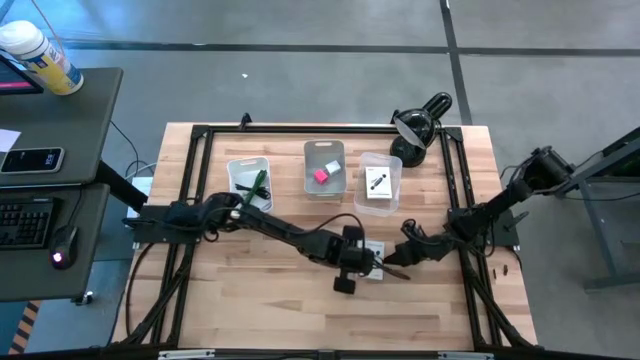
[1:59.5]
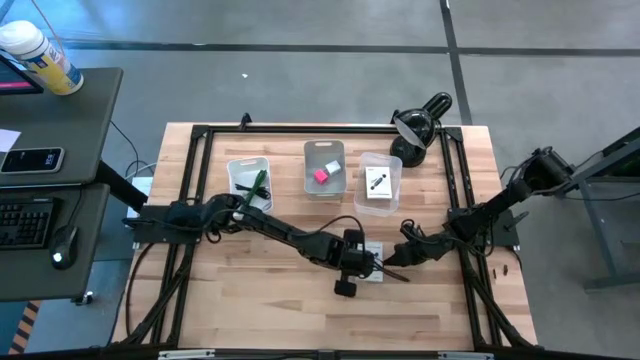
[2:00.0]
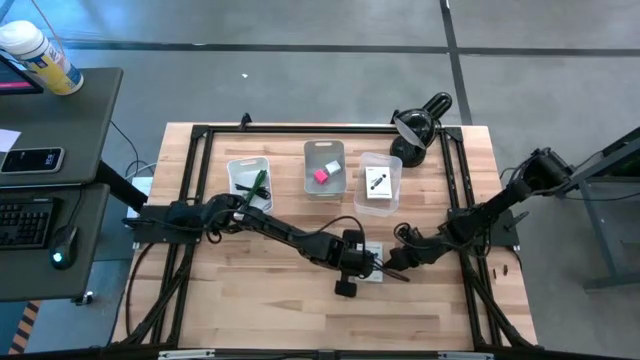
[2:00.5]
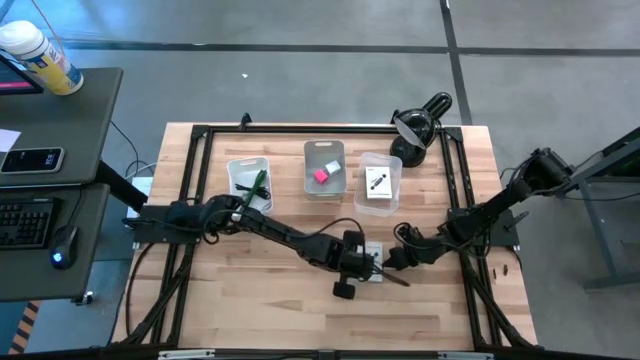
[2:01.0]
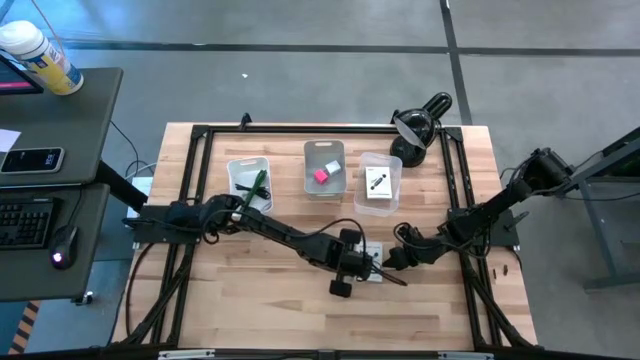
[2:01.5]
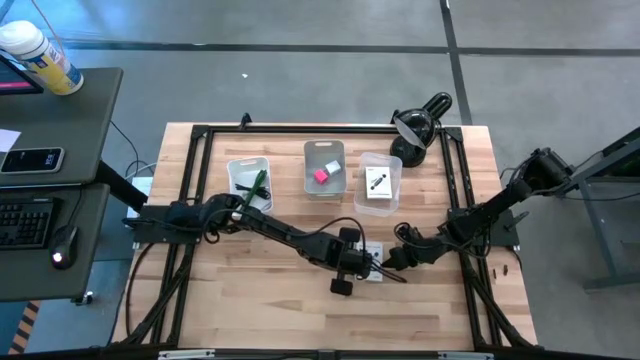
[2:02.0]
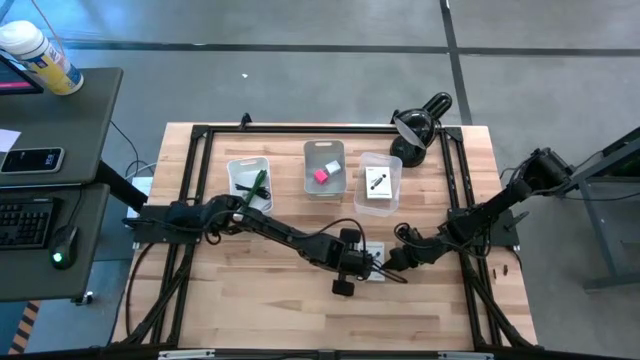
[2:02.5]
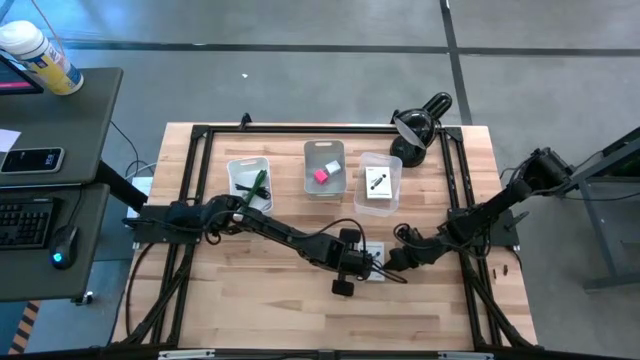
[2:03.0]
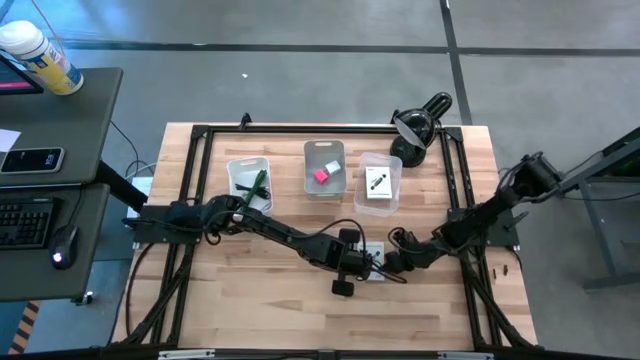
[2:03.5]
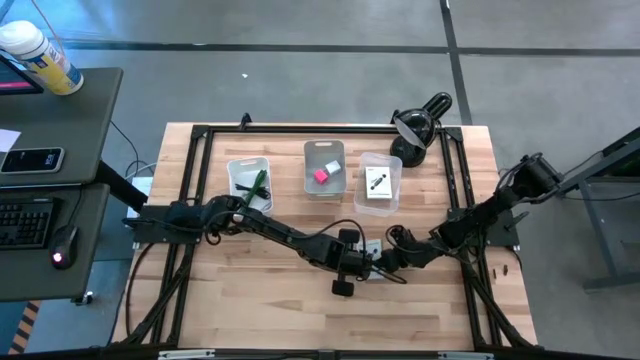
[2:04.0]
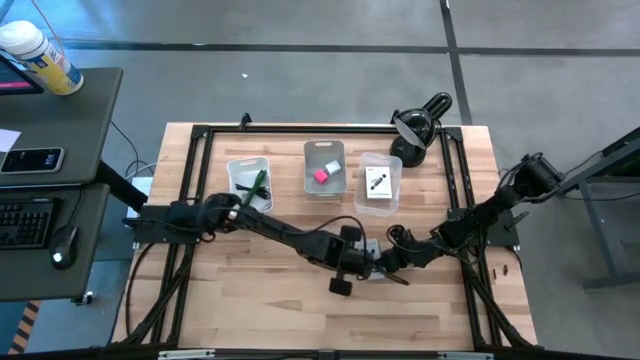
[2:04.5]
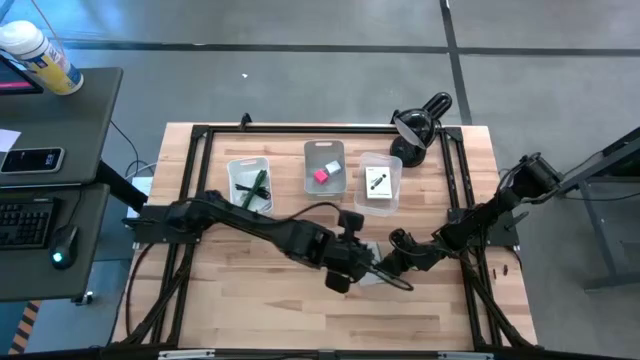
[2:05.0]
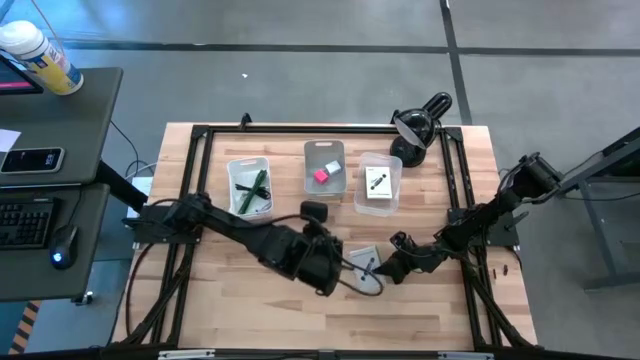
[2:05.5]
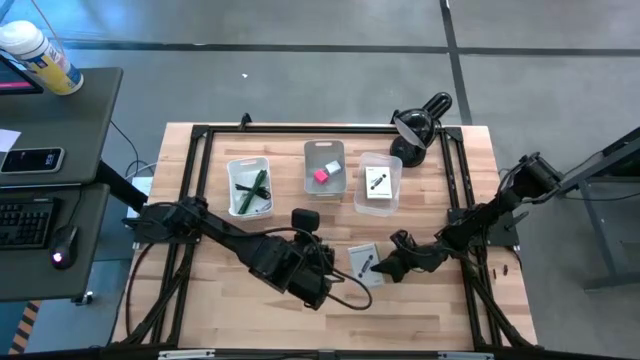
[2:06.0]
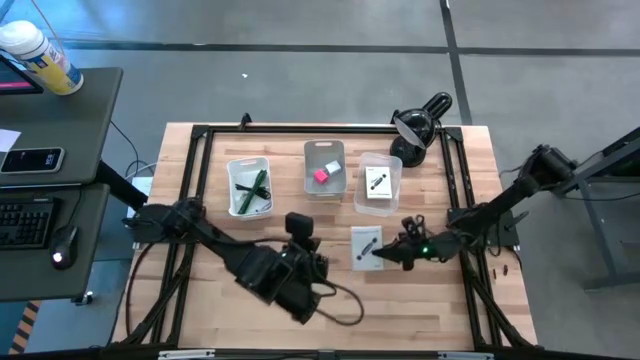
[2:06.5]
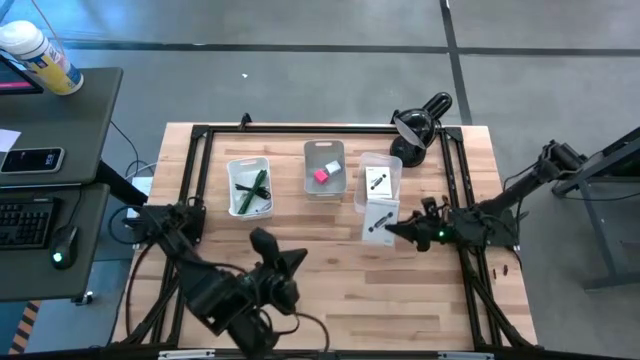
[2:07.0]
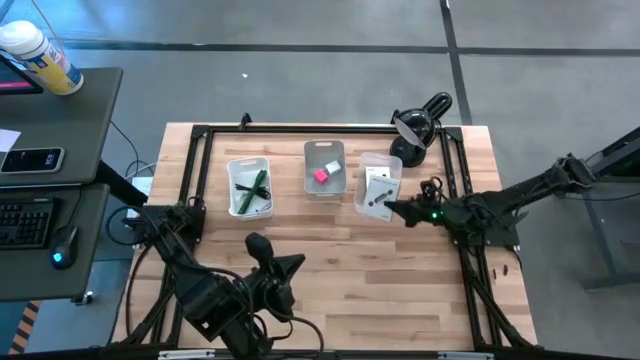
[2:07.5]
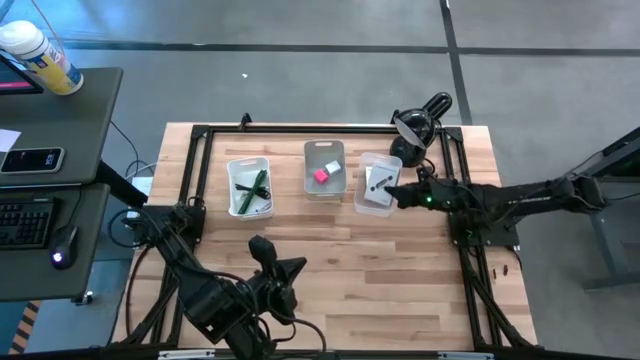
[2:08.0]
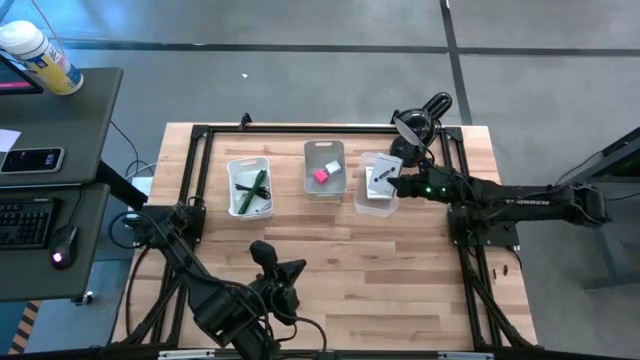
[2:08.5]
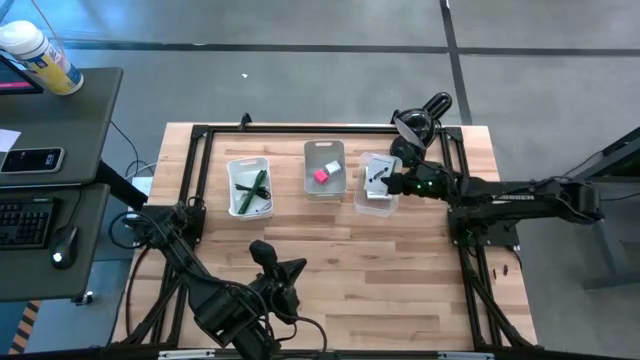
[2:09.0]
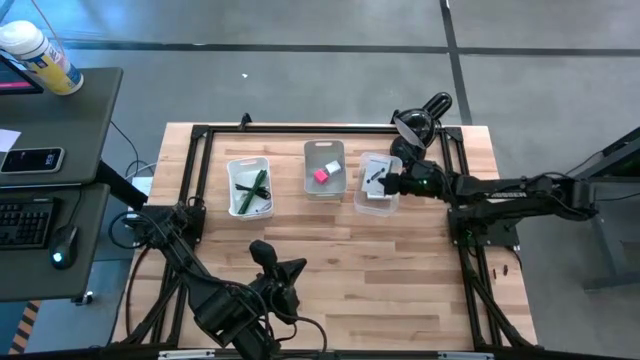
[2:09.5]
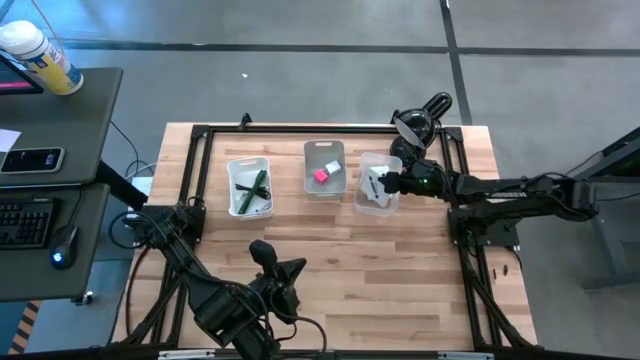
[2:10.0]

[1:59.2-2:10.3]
Task: Pick and place items into bin
Put the card reader box into the transparent bin

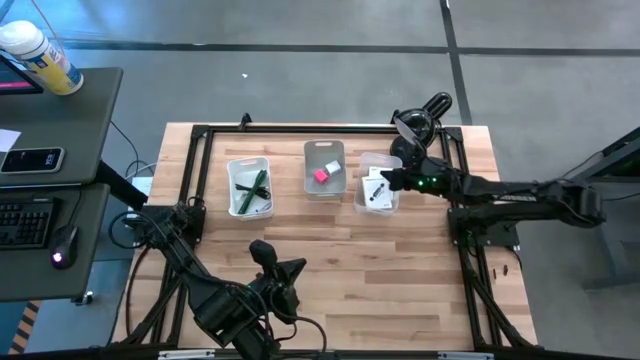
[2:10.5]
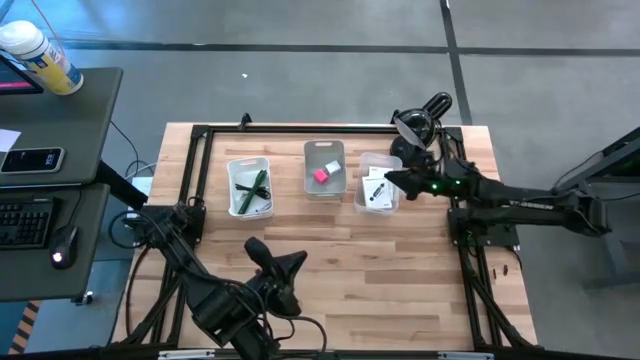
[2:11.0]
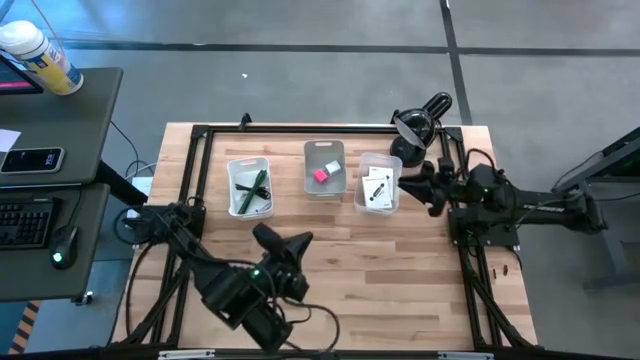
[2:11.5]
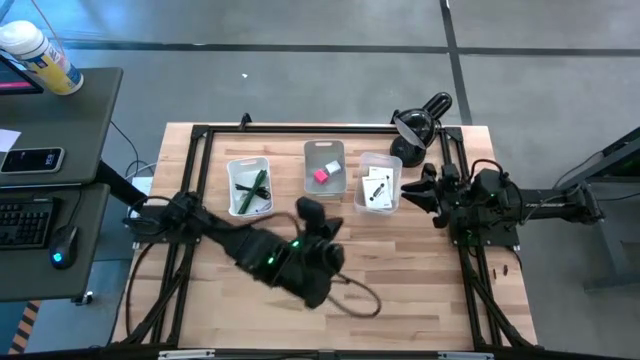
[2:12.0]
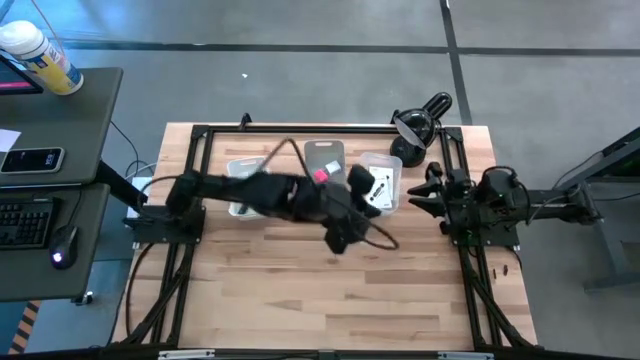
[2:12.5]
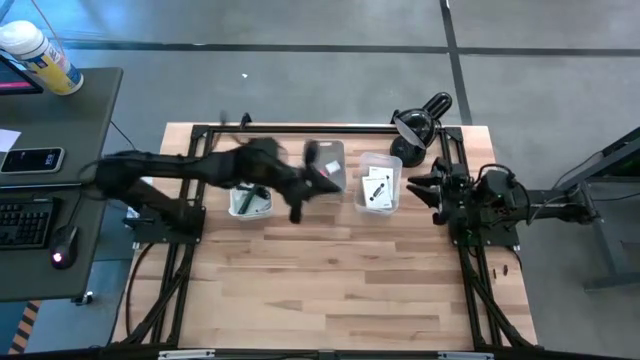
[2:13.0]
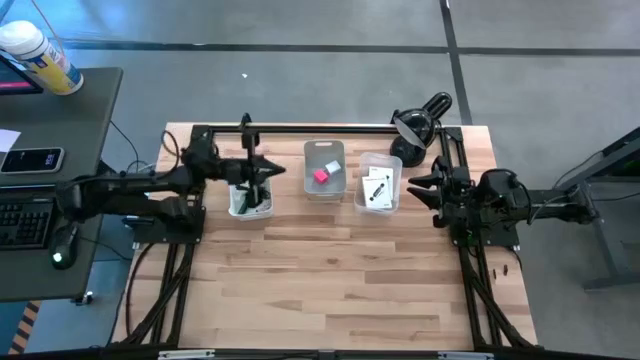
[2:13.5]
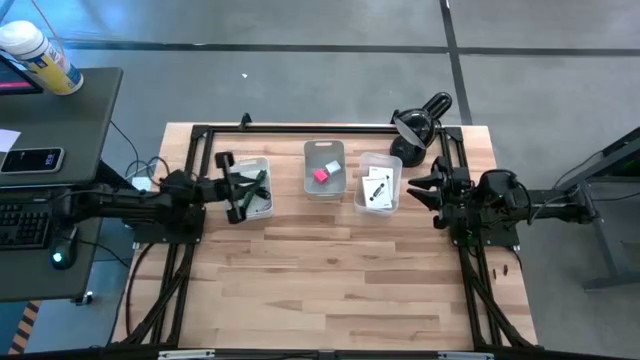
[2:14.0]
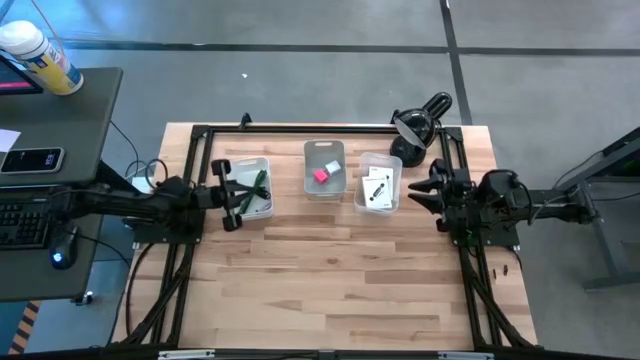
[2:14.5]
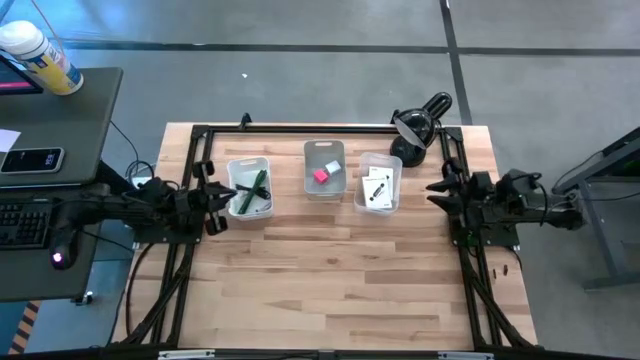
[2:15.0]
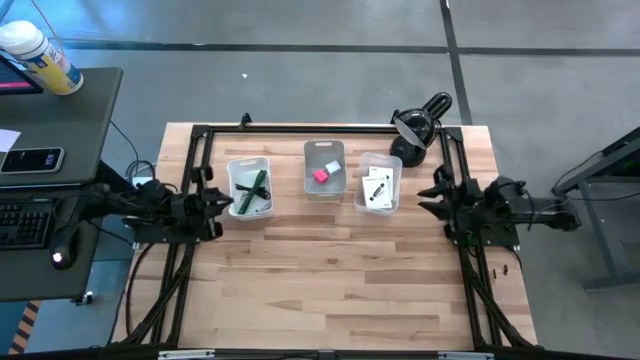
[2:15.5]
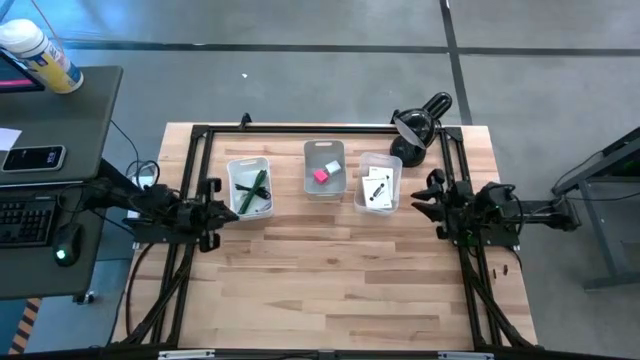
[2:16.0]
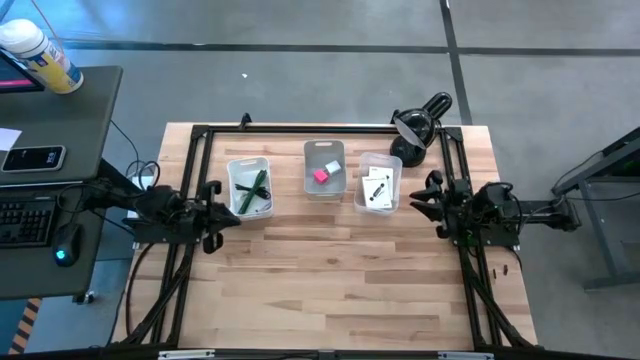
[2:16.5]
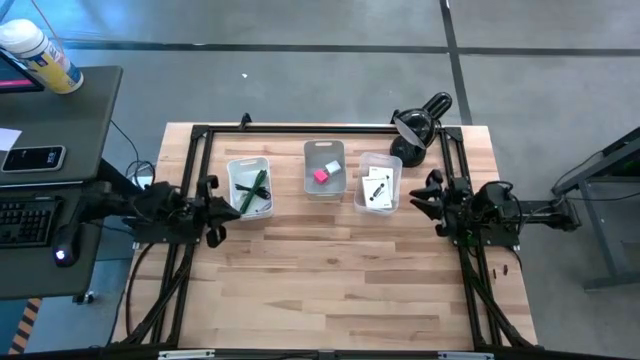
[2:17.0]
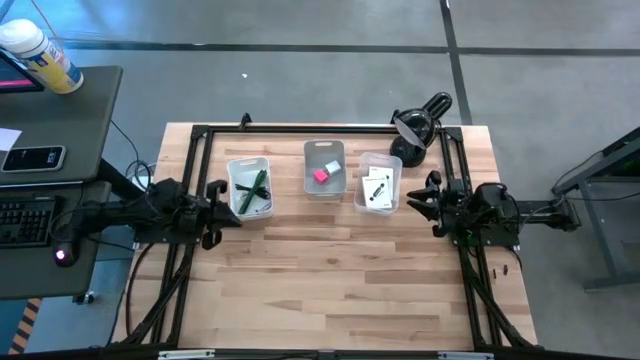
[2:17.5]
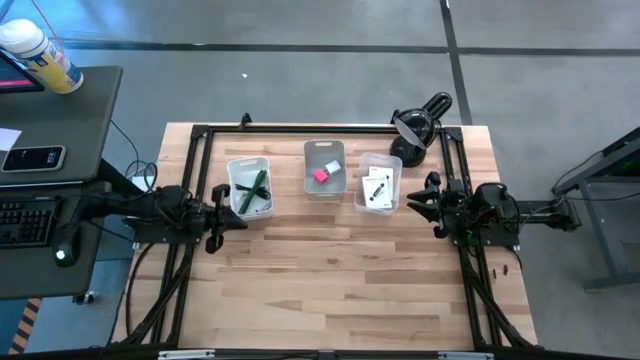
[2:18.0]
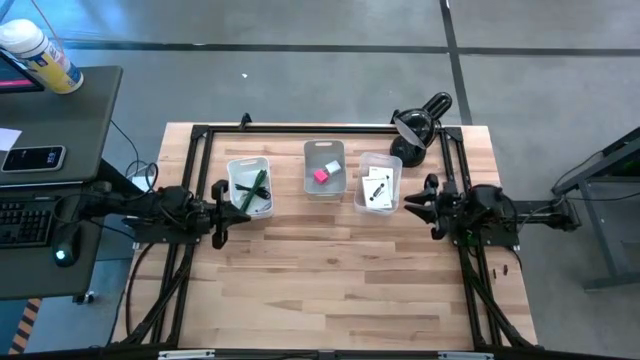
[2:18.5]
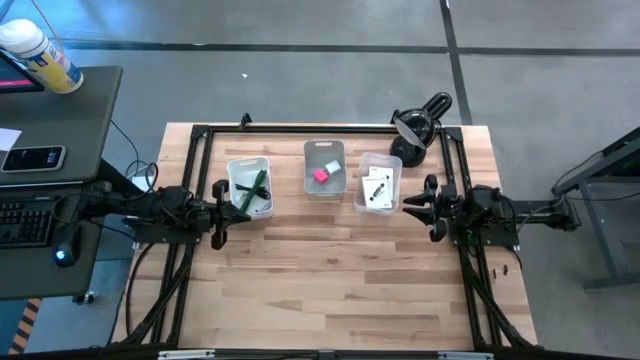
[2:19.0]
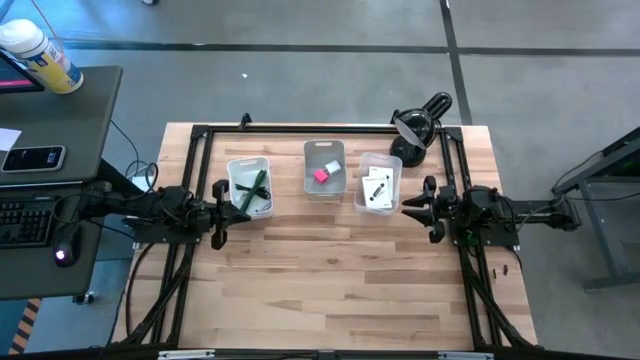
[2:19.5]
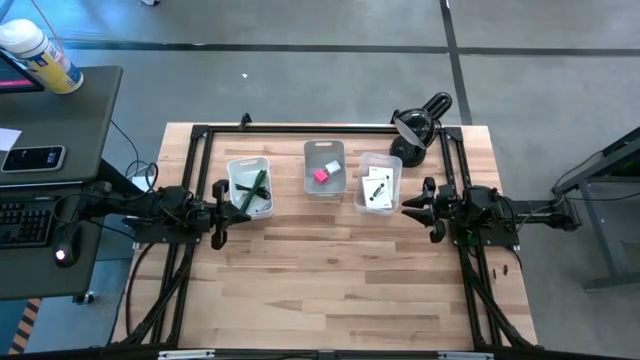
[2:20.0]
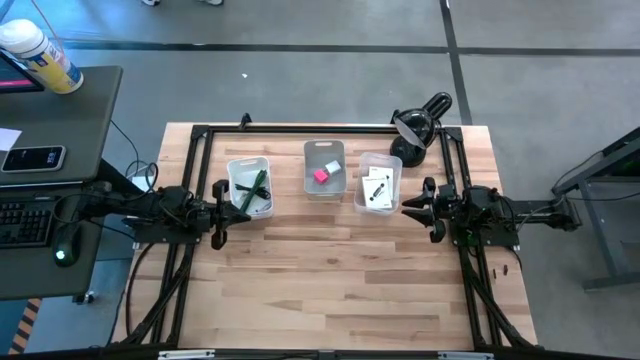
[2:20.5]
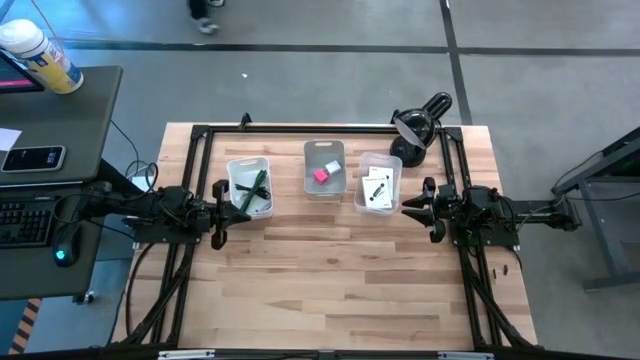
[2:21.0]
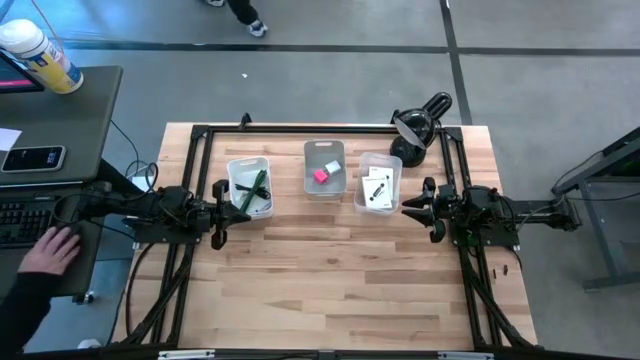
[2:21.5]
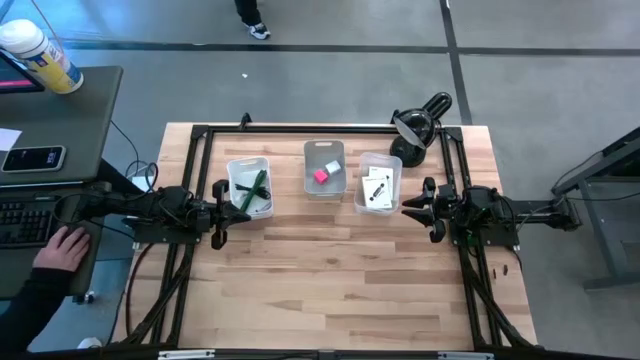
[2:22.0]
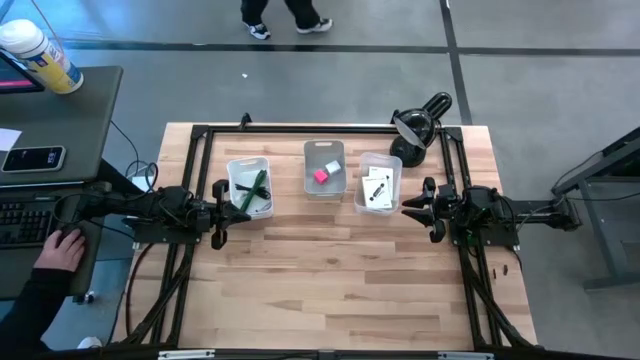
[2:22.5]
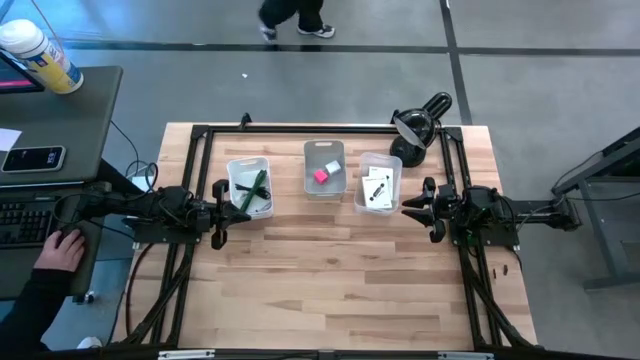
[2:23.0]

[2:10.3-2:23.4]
Return to Home Position
